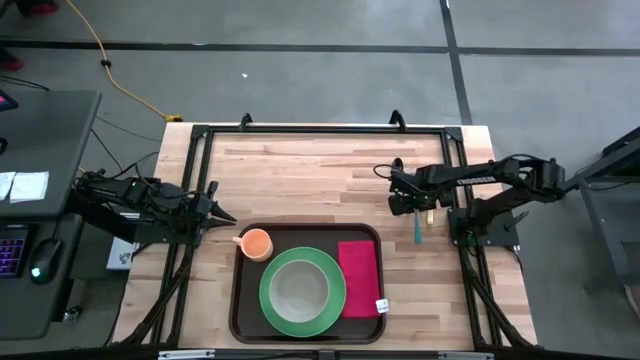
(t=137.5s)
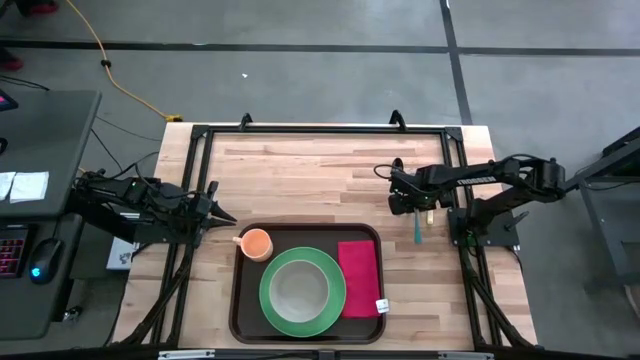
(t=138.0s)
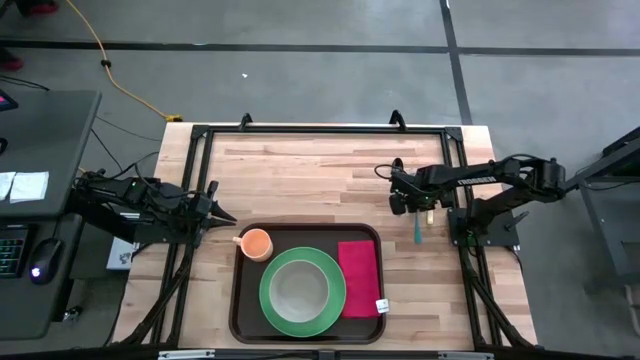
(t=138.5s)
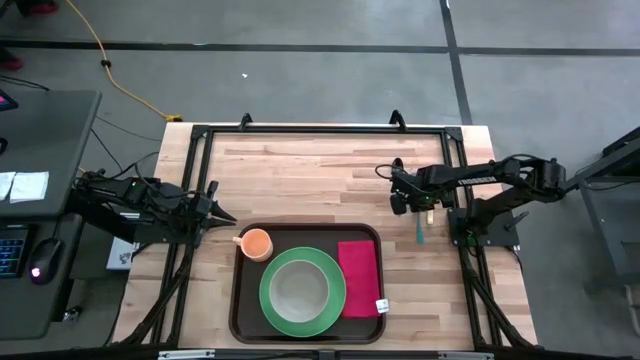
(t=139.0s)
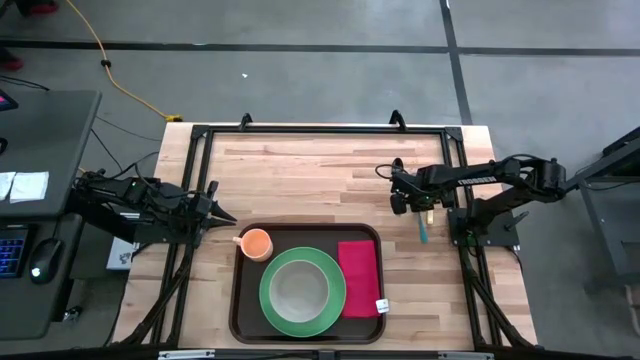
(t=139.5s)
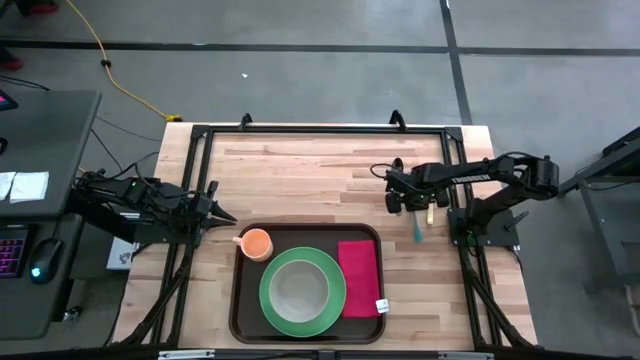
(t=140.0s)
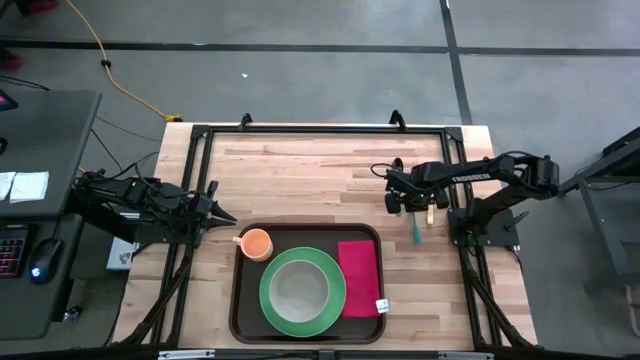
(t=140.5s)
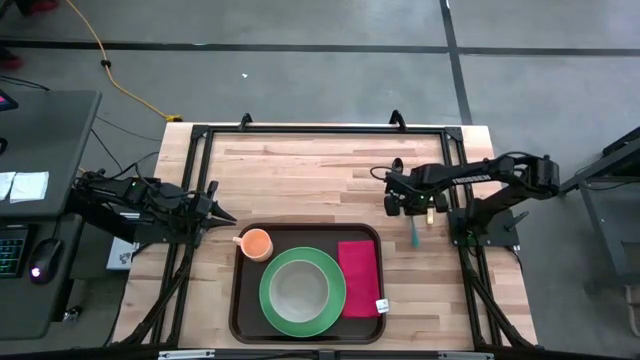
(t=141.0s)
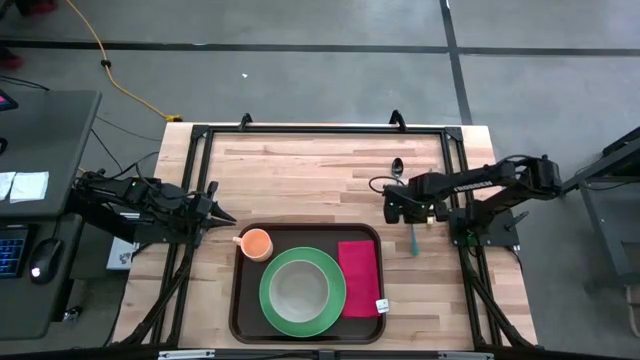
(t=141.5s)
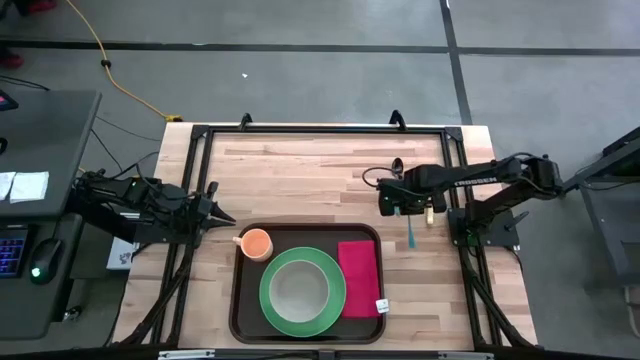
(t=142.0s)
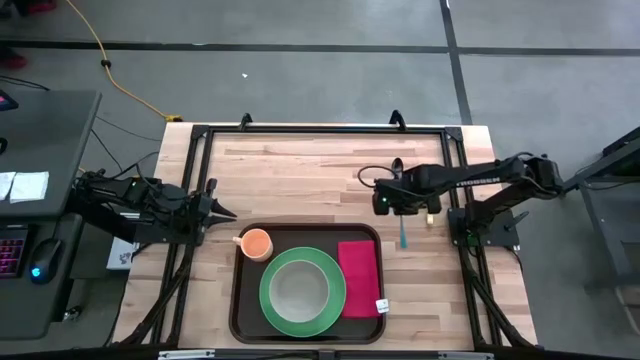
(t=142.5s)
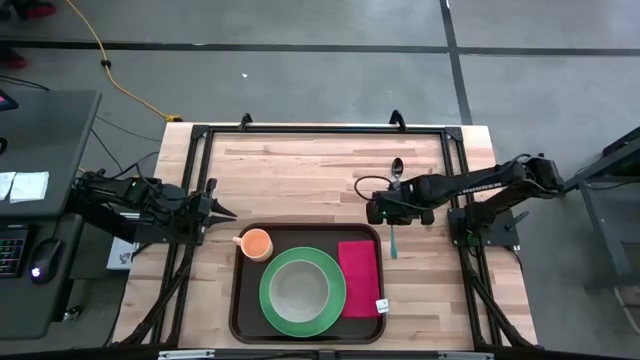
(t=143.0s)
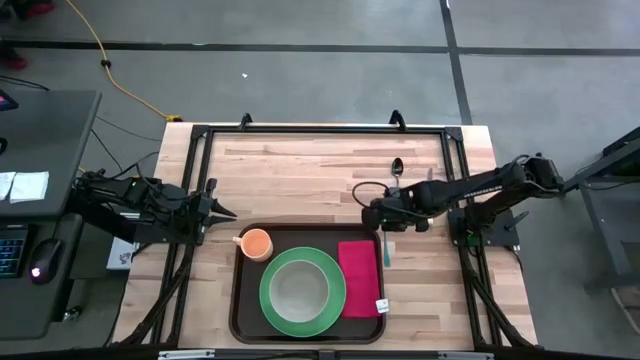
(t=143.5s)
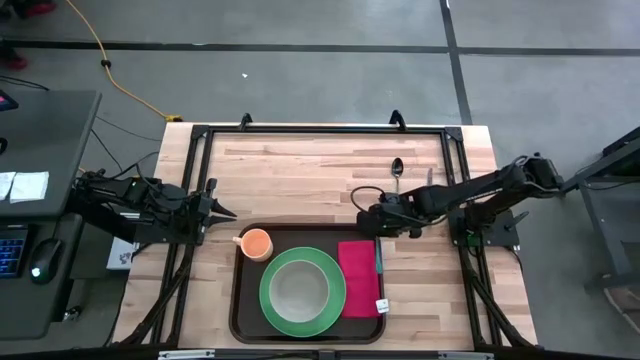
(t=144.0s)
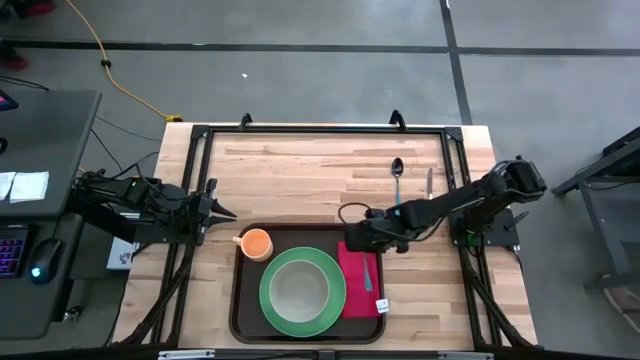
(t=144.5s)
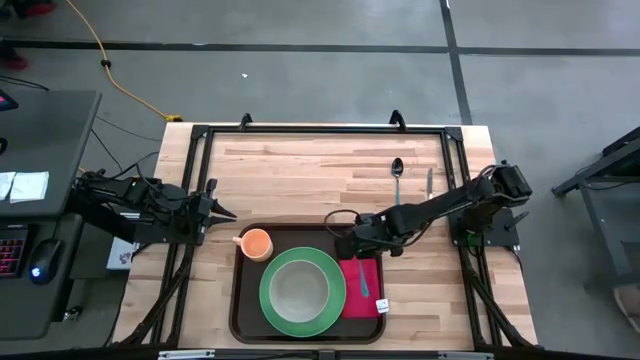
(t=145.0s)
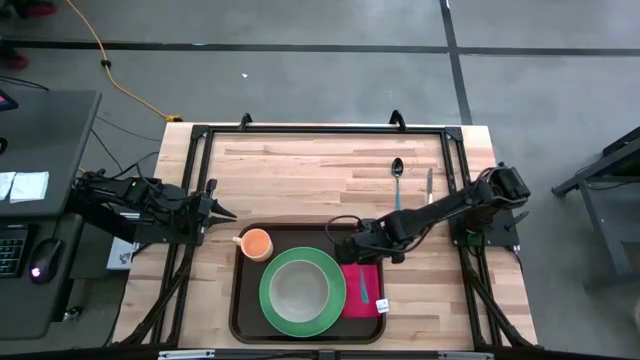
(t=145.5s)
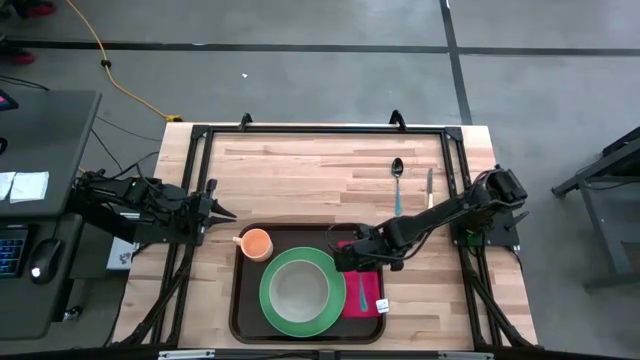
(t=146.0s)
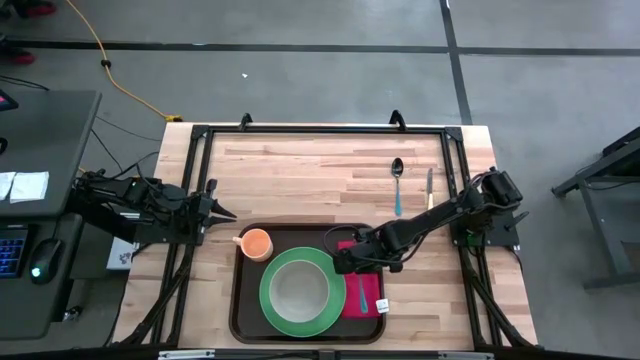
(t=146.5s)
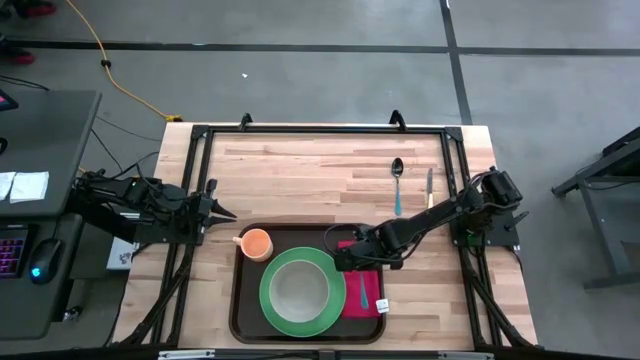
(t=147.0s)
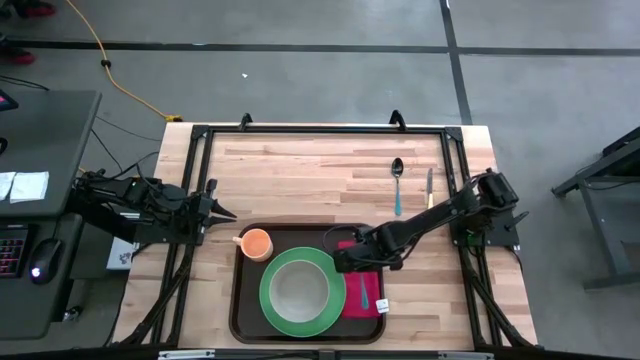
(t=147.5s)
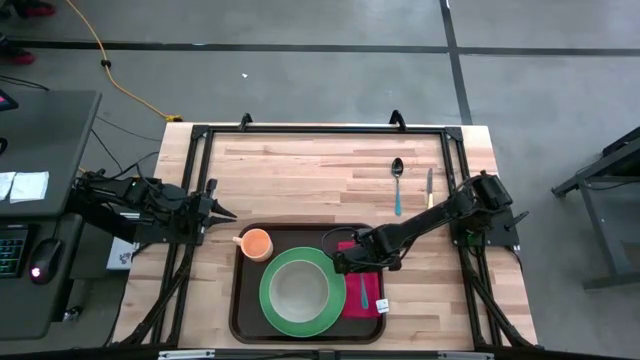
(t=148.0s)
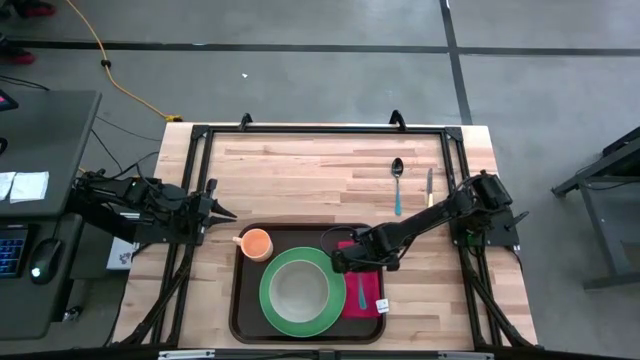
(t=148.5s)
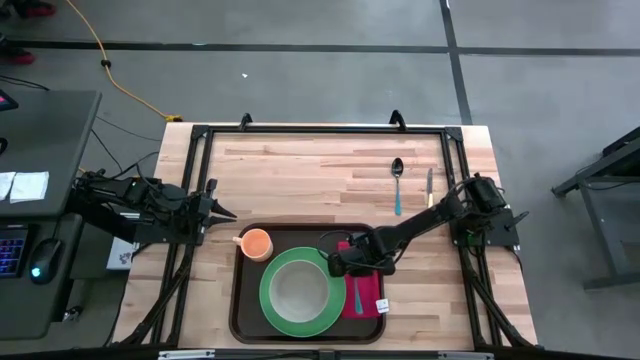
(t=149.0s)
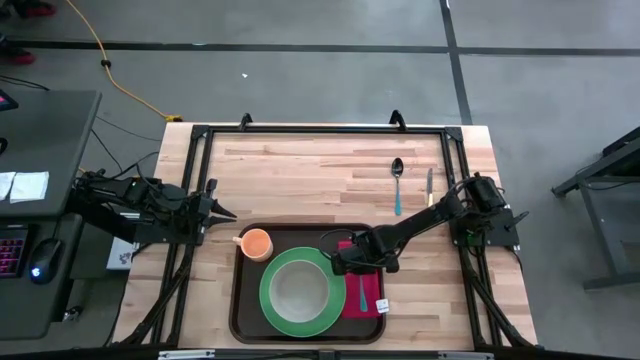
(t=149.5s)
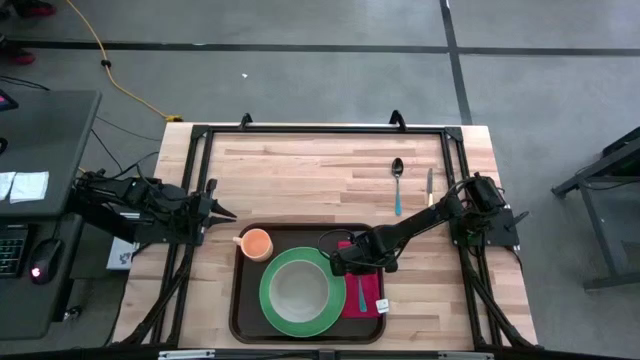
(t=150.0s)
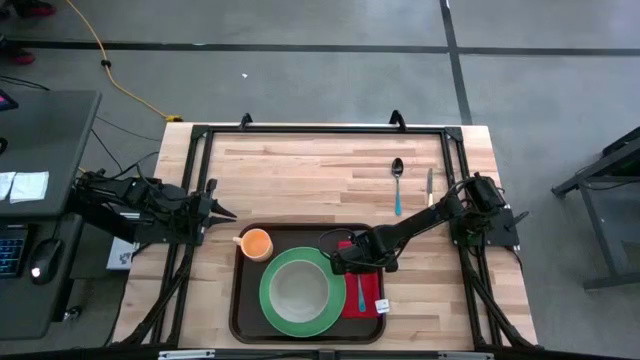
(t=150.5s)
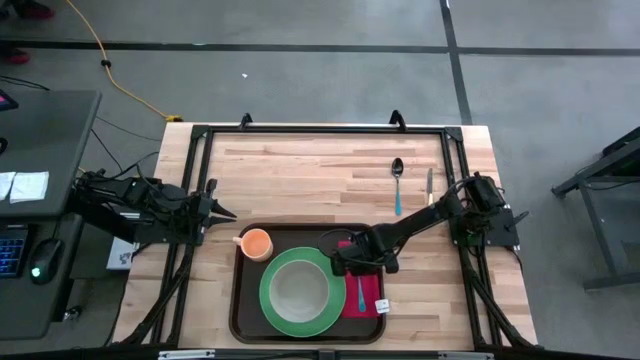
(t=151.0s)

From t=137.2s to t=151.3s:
Task: Set up tray
Put the blue fork on top of the red napkin on the brown tray

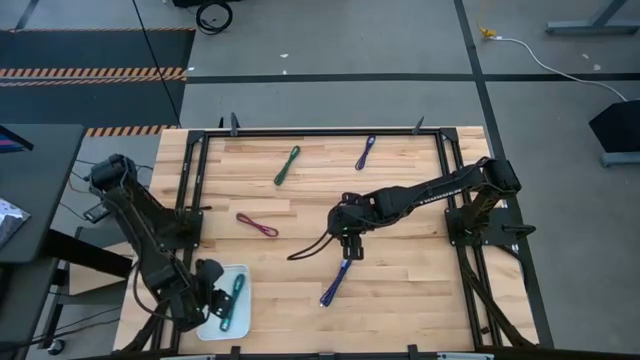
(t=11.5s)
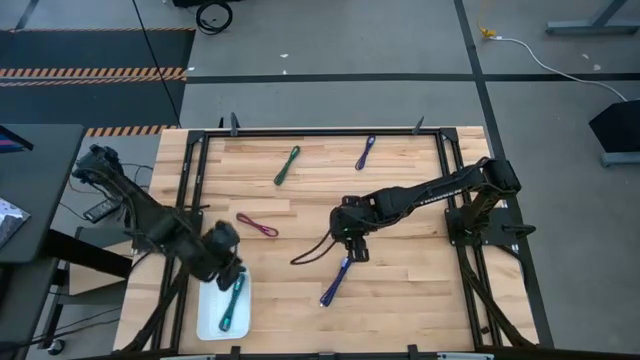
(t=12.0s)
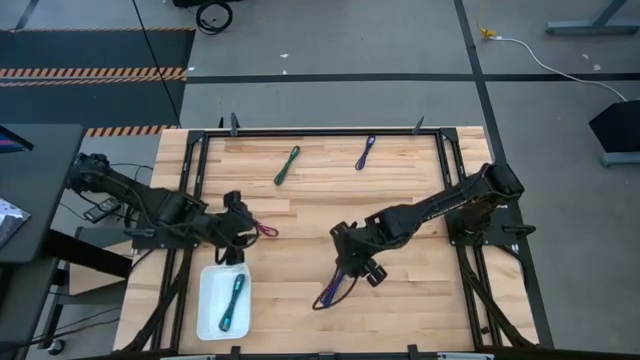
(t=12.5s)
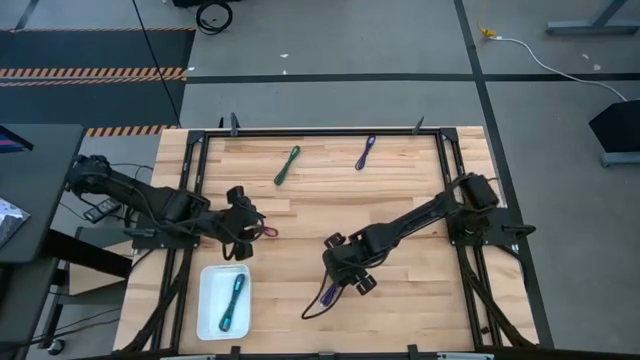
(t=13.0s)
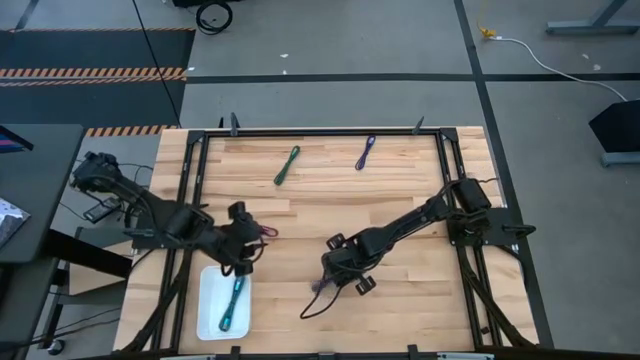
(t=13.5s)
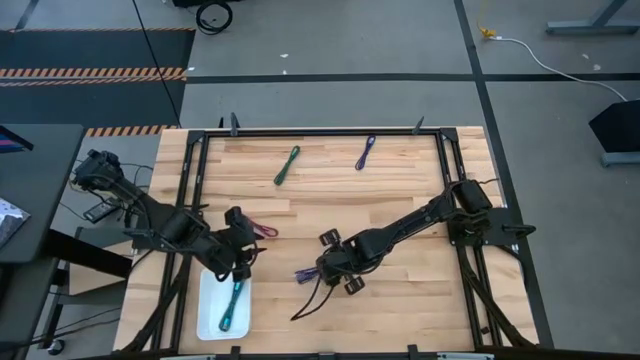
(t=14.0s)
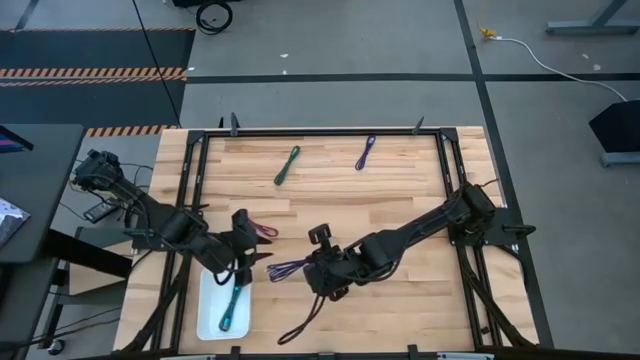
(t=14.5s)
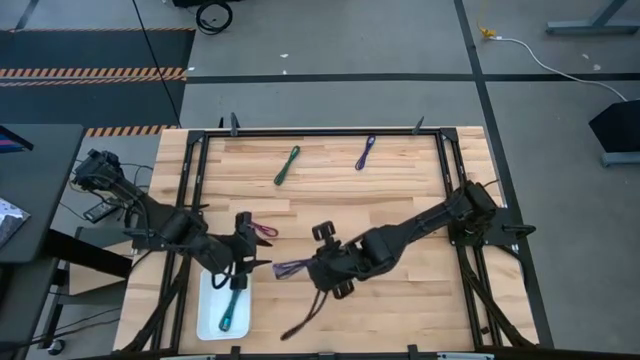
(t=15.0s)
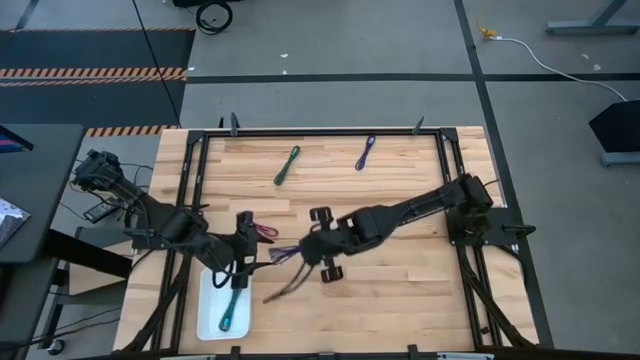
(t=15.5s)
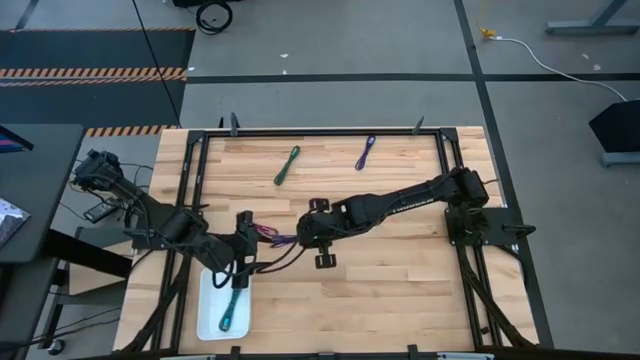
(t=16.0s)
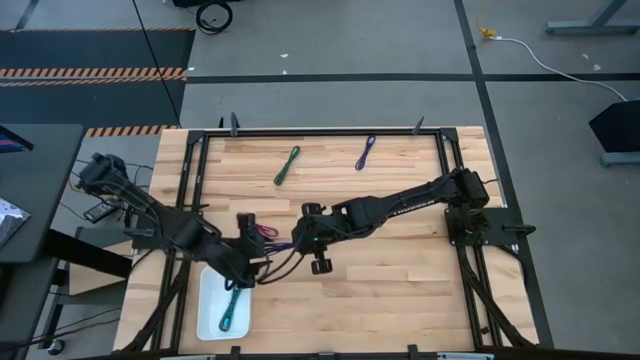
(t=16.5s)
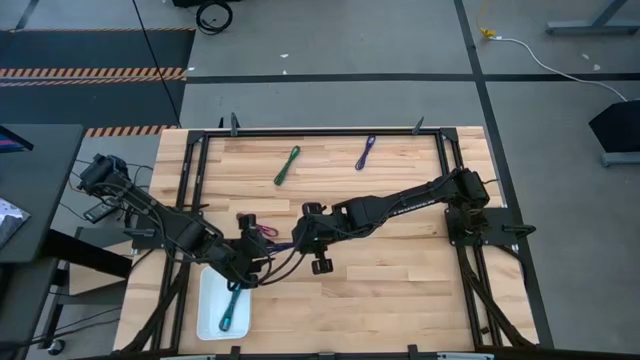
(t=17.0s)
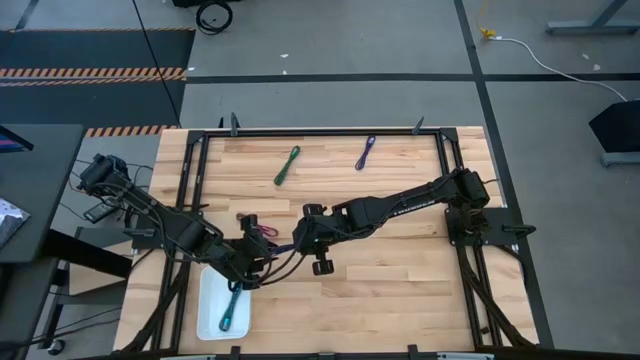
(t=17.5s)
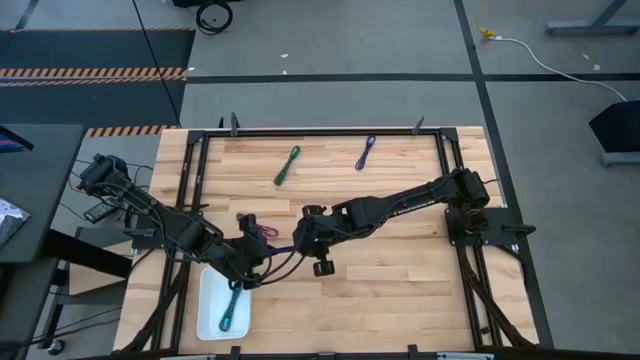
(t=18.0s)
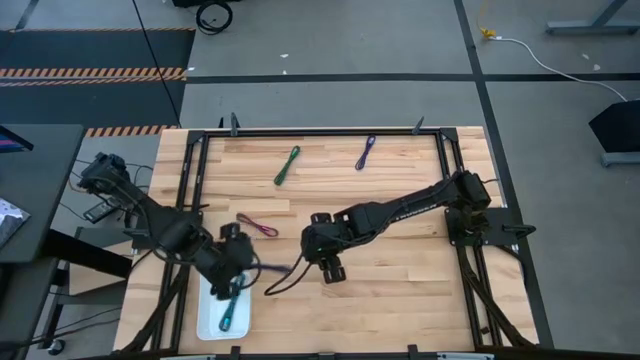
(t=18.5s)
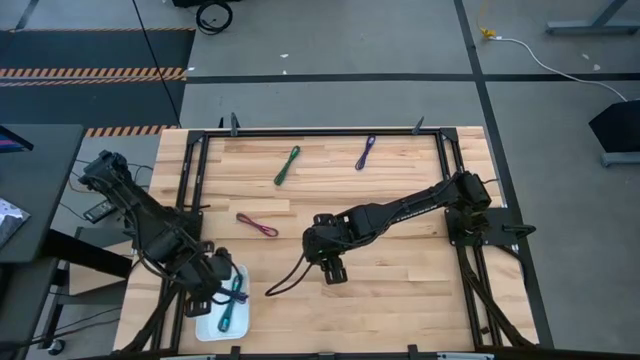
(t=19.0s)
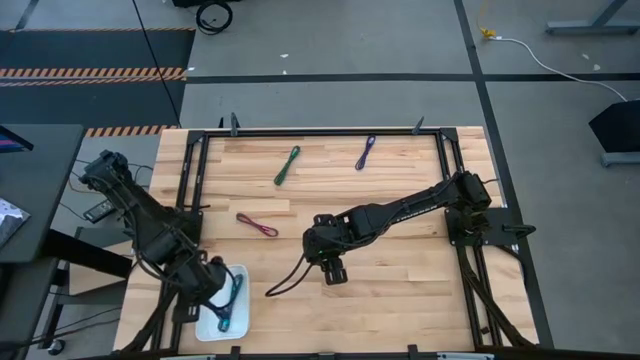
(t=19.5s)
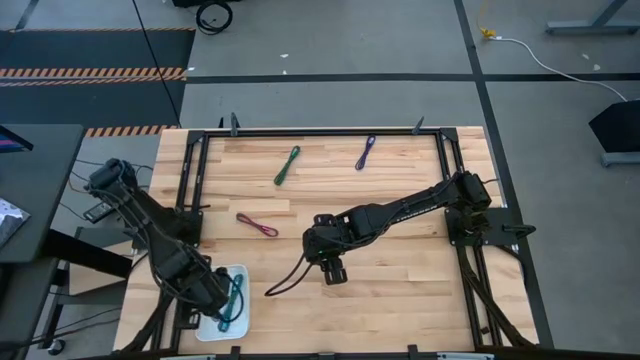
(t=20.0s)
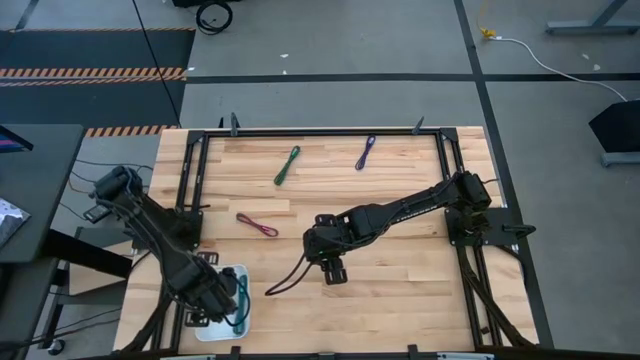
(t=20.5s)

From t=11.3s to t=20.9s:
Task: Pick and place USB-C Cables
Put the bottom blue charger cable into the bin
